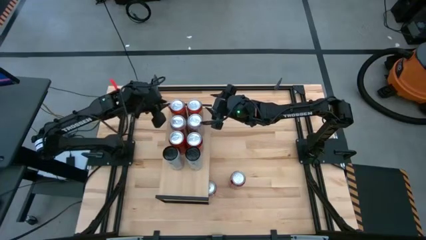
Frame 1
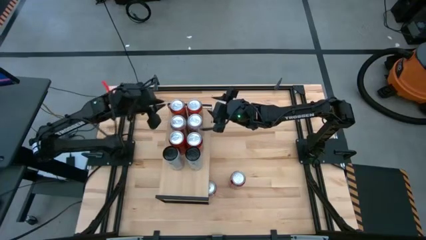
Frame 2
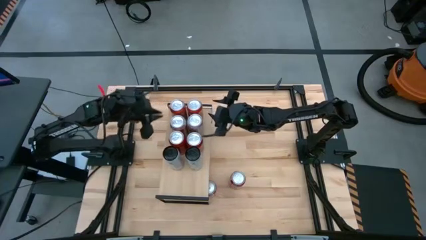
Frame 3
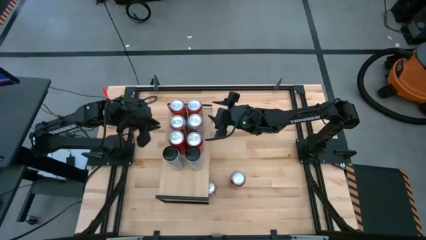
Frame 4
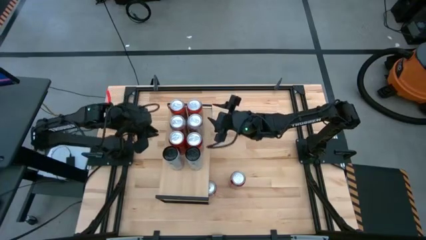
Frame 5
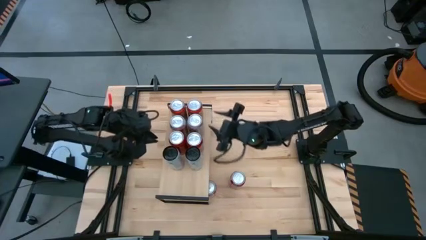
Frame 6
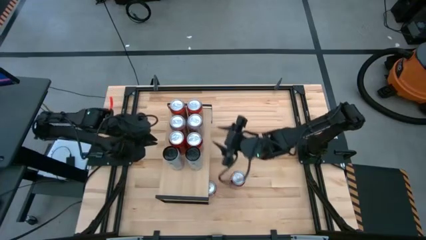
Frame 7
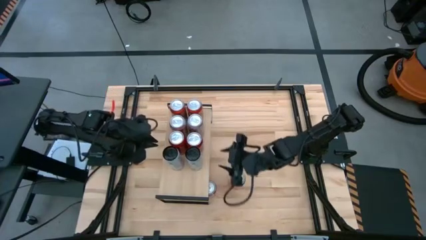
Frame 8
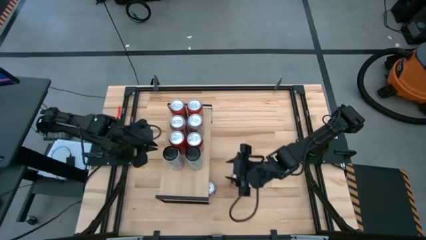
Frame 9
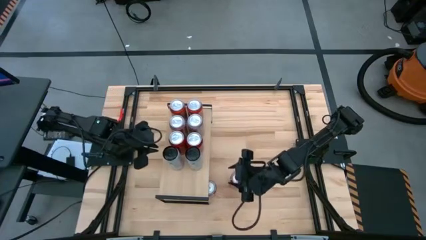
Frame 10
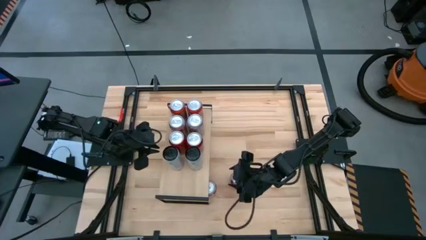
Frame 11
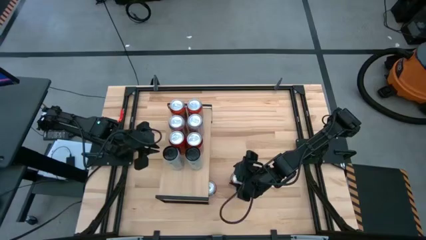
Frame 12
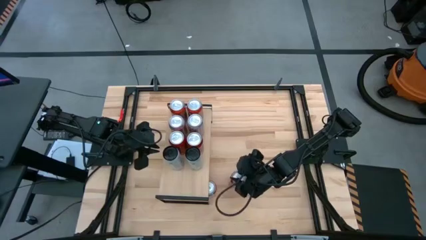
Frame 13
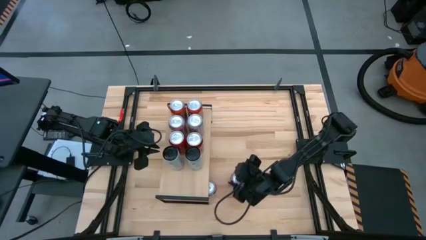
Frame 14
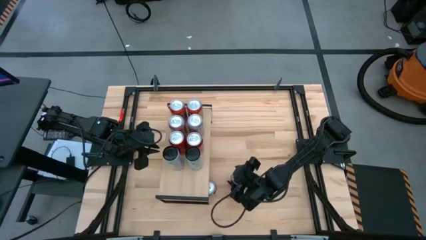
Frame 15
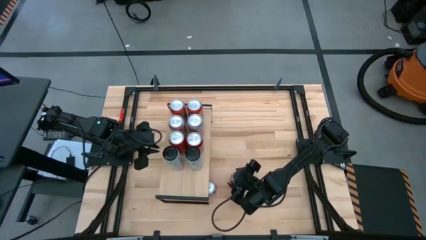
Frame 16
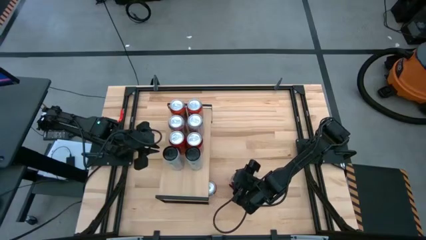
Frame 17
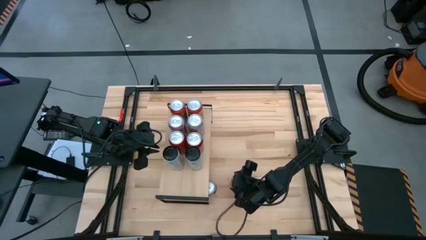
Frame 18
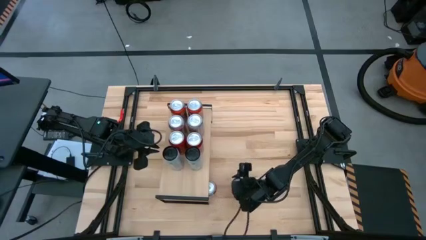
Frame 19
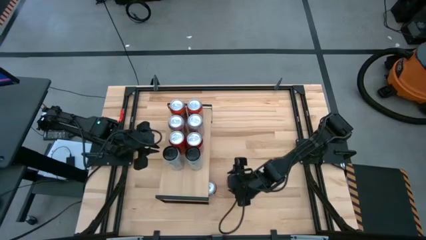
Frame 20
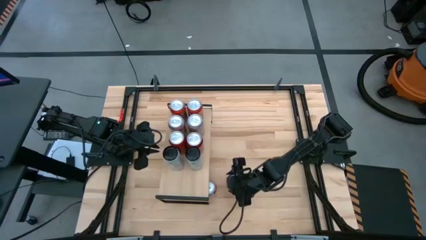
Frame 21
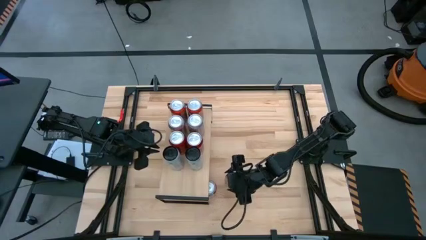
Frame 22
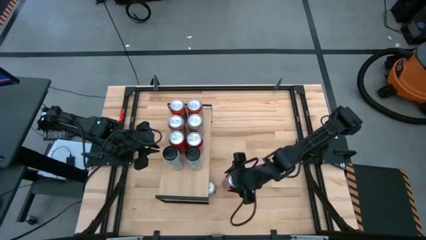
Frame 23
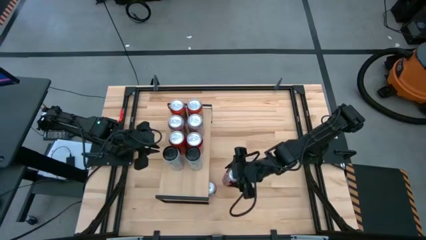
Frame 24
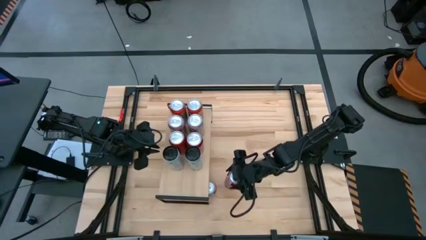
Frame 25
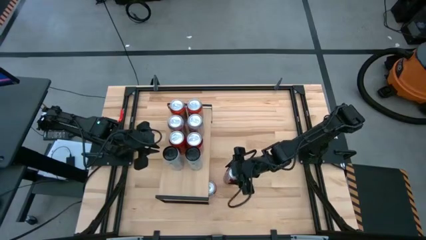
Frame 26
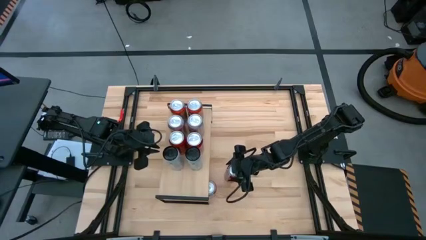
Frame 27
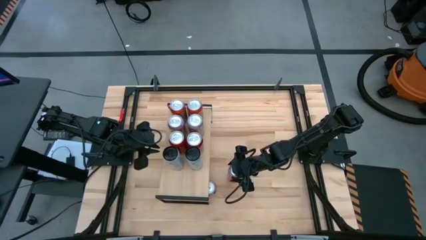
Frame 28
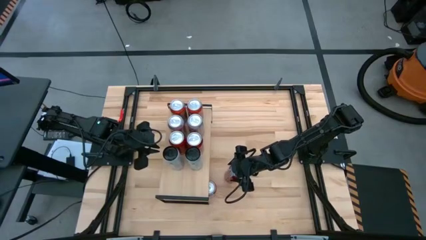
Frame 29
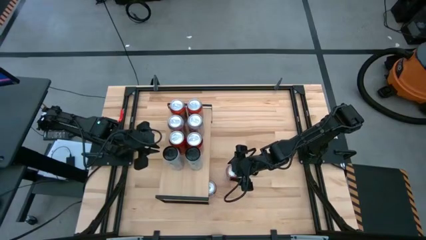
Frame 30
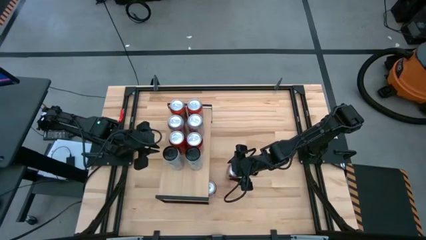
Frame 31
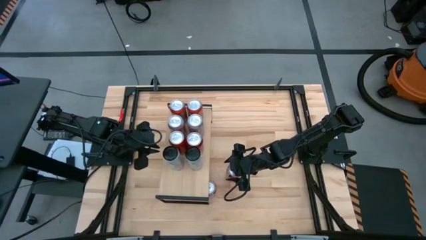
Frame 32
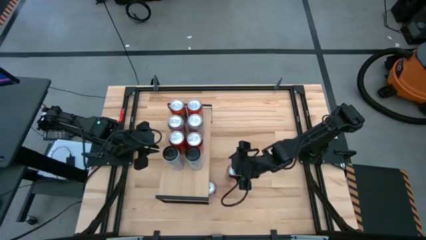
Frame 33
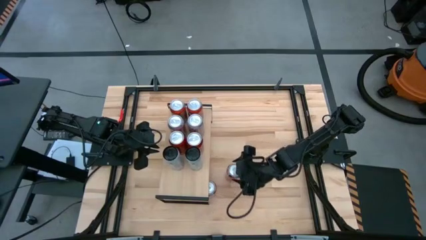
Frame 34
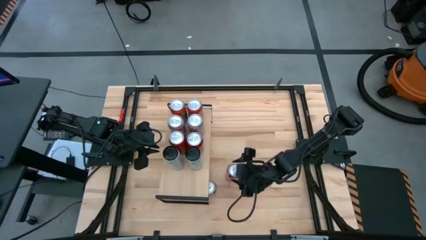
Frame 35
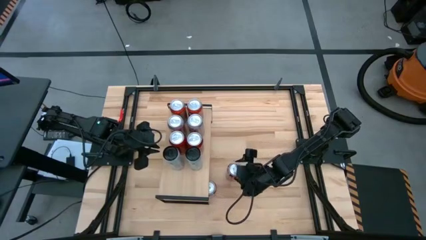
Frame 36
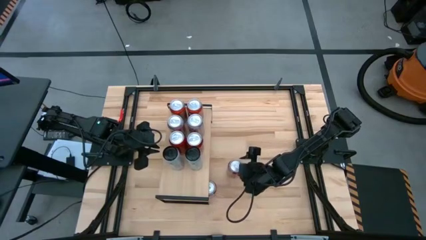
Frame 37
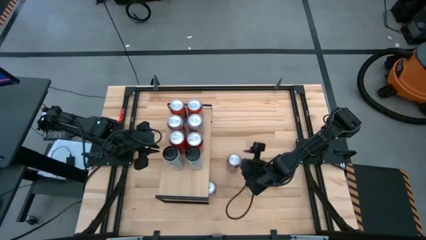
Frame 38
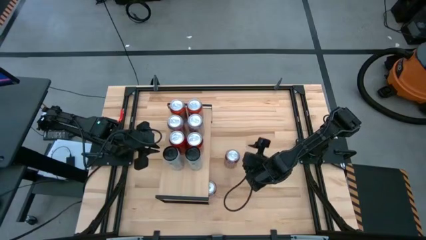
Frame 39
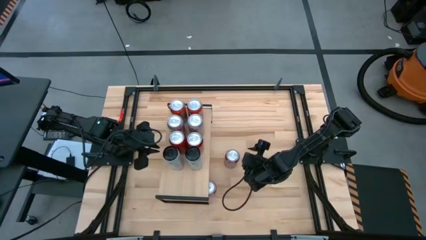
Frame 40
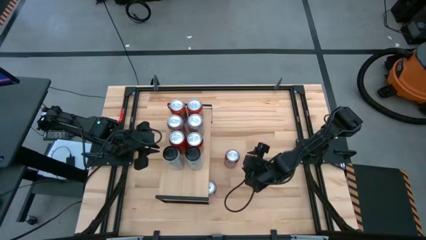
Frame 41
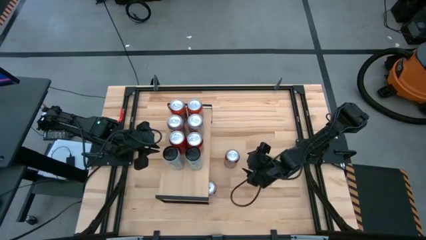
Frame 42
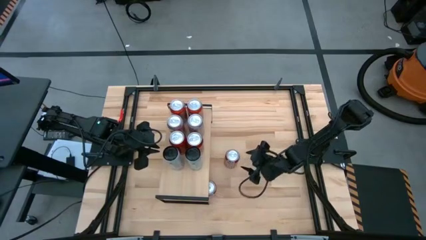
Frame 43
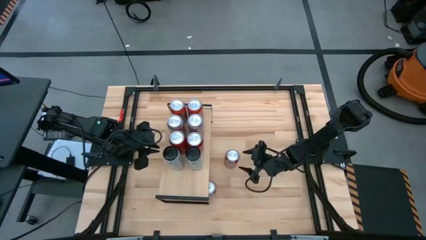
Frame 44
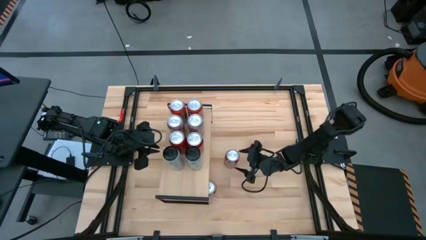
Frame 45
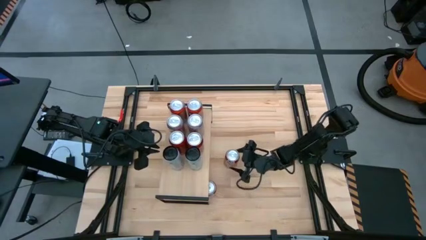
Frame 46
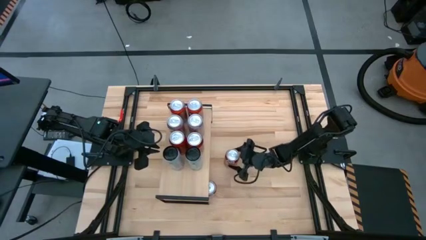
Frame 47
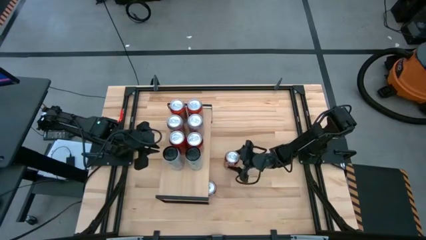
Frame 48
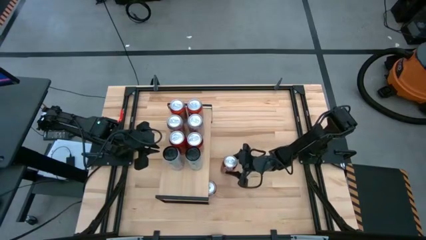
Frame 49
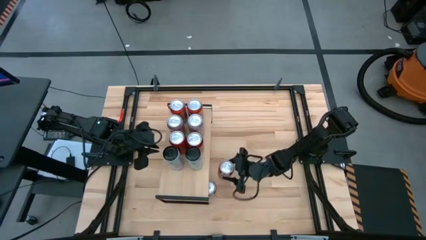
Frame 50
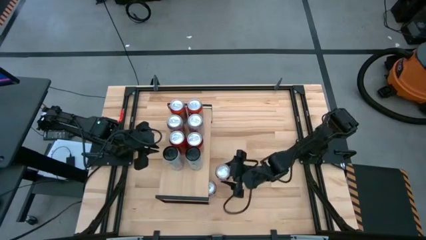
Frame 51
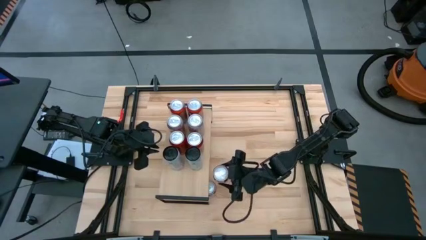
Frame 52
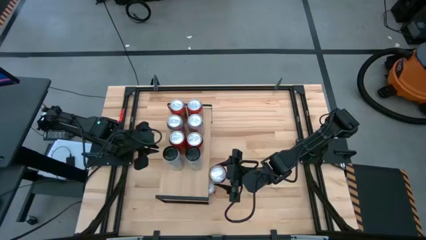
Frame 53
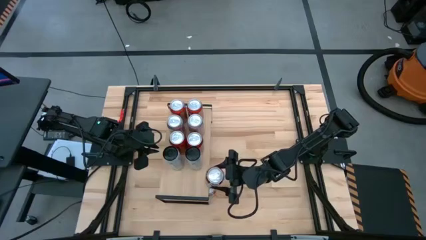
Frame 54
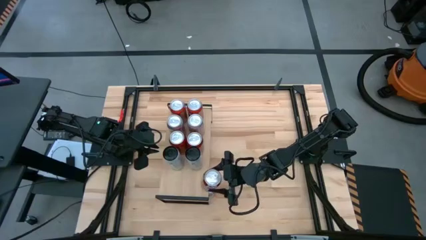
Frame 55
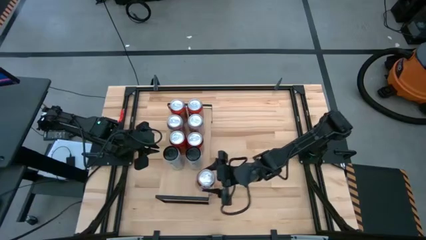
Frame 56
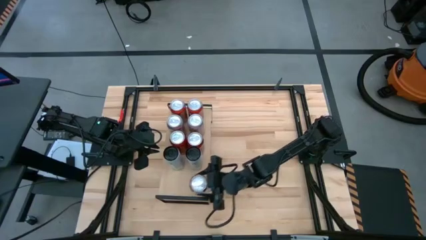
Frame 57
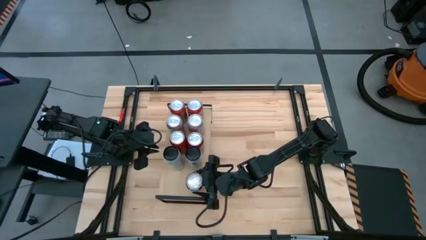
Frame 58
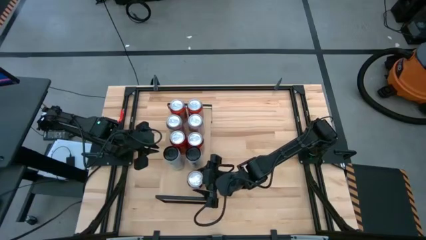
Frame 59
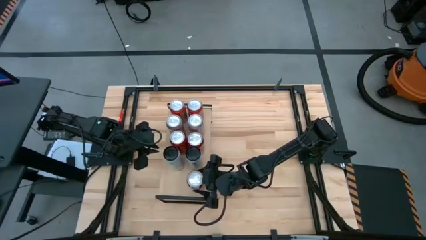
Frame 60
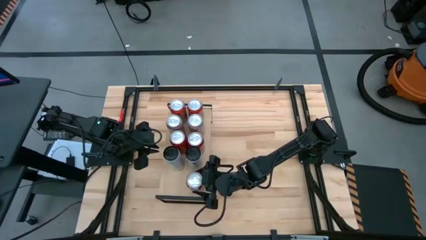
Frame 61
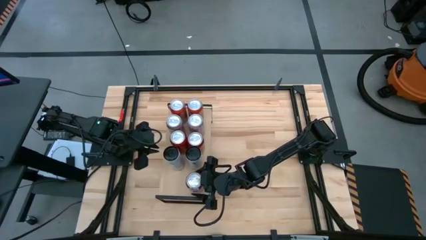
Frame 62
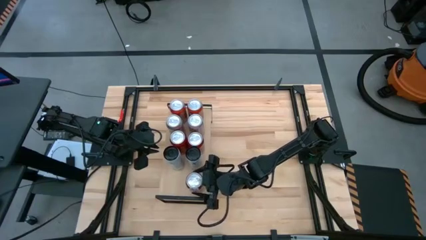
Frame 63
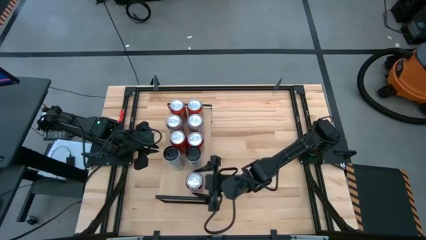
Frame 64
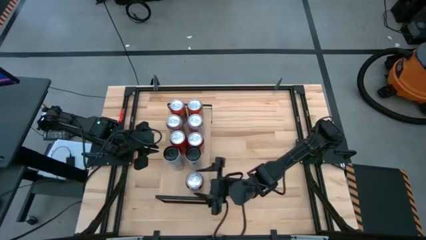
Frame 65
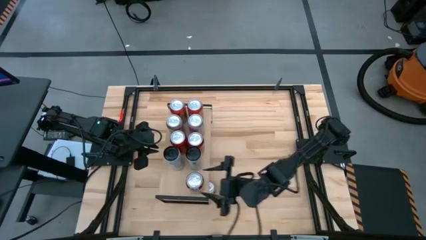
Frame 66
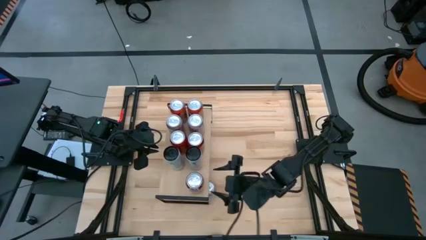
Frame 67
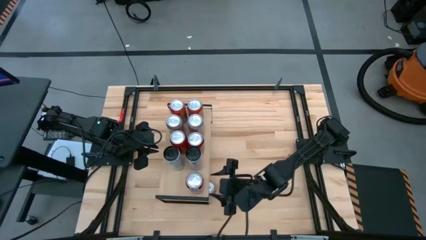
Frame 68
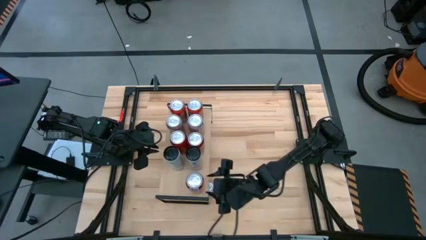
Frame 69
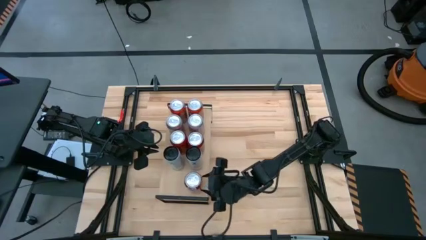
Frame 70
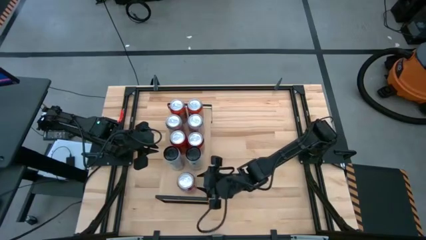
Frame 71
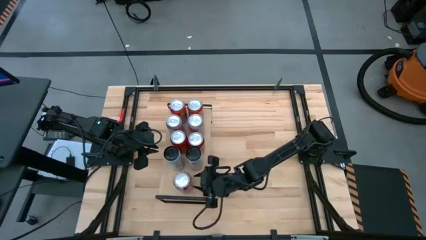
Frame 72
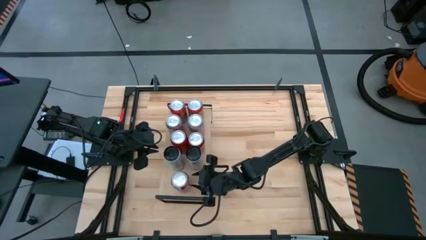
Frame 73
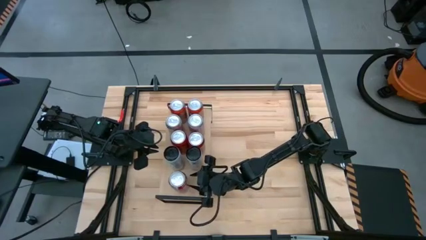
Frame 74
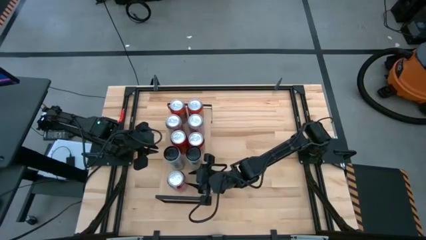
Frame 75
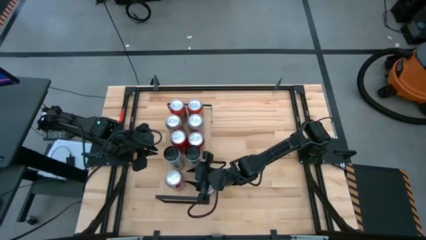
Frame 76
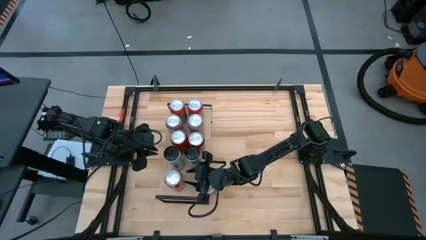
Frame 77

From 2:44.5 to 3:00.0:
Task: Place canned beverage on shelf
Put the right red silver soda can on the shelf
